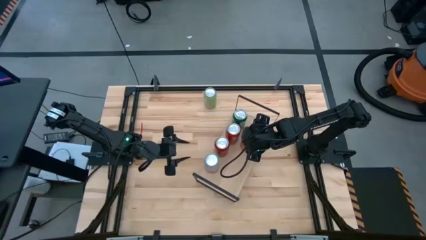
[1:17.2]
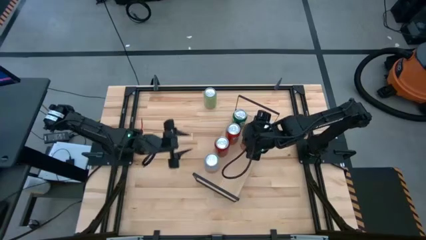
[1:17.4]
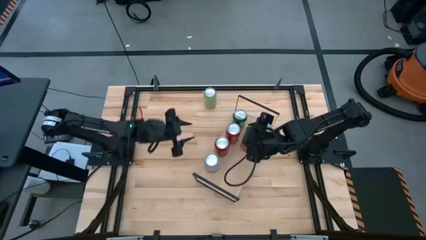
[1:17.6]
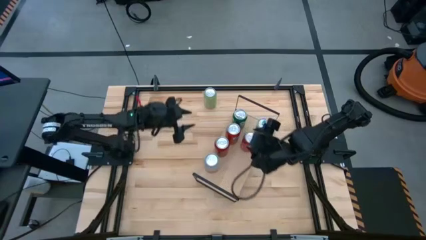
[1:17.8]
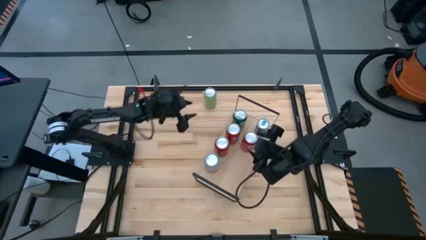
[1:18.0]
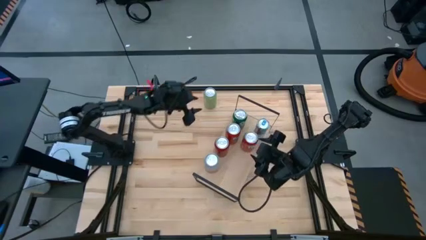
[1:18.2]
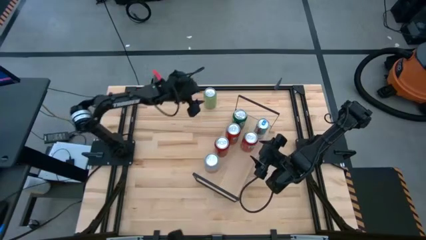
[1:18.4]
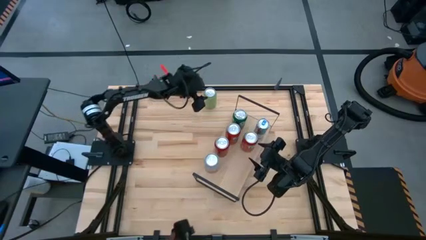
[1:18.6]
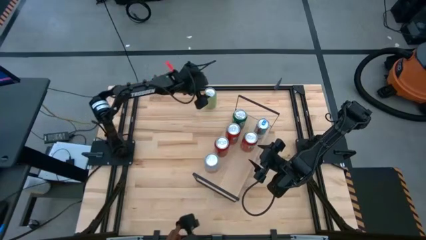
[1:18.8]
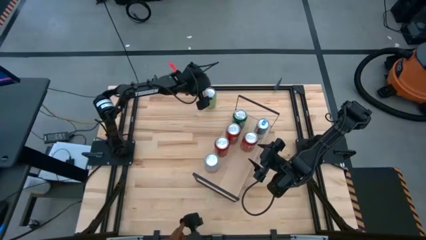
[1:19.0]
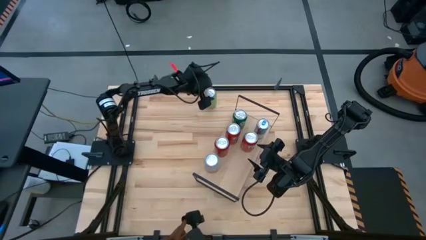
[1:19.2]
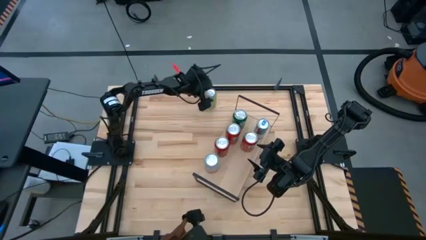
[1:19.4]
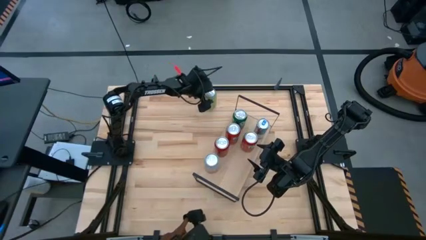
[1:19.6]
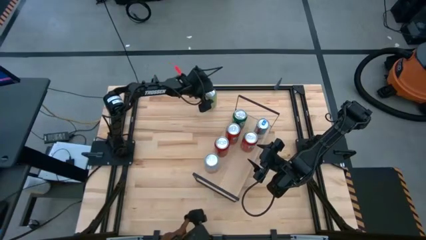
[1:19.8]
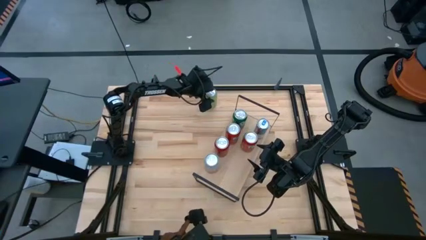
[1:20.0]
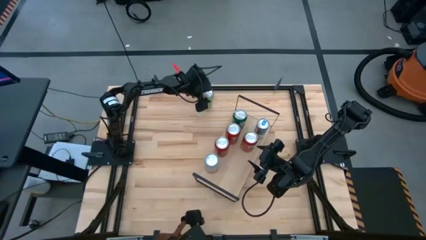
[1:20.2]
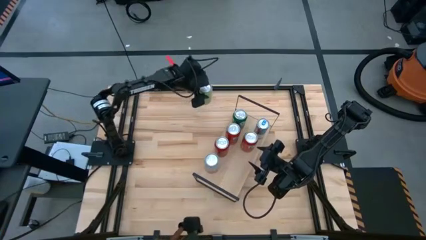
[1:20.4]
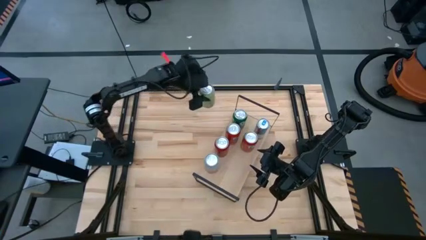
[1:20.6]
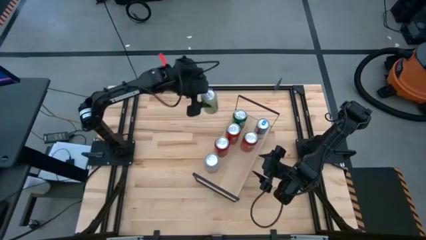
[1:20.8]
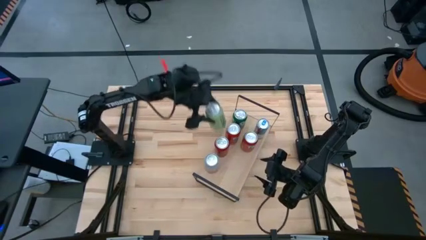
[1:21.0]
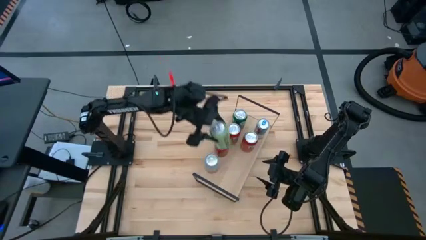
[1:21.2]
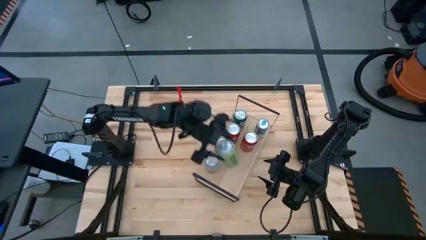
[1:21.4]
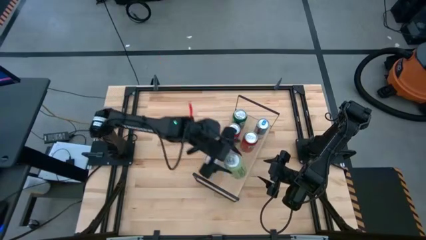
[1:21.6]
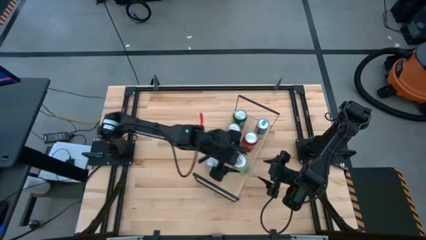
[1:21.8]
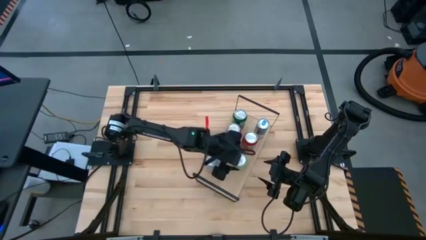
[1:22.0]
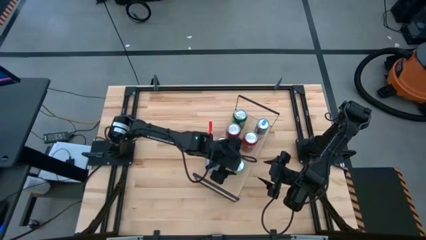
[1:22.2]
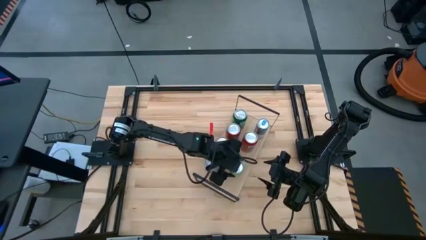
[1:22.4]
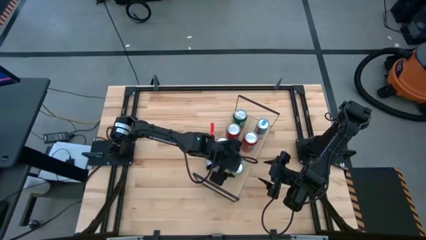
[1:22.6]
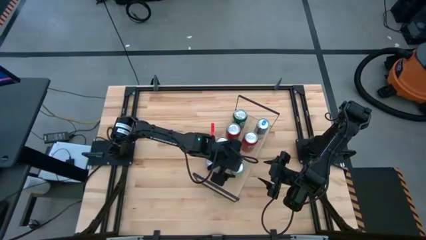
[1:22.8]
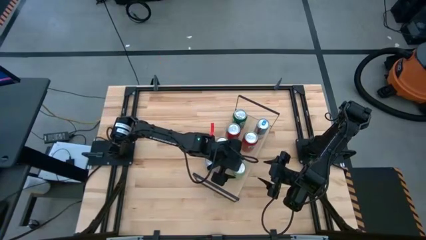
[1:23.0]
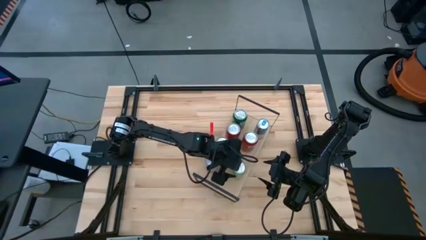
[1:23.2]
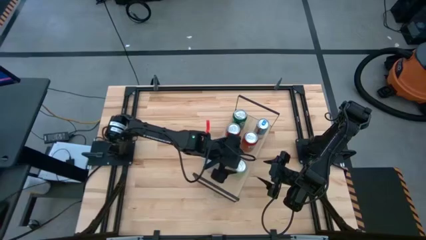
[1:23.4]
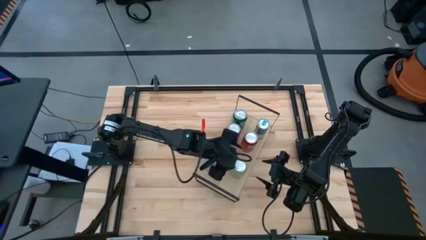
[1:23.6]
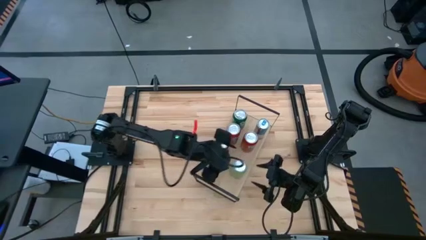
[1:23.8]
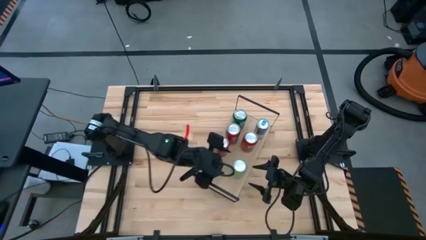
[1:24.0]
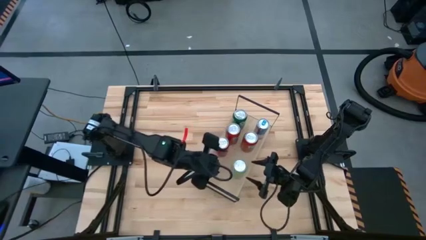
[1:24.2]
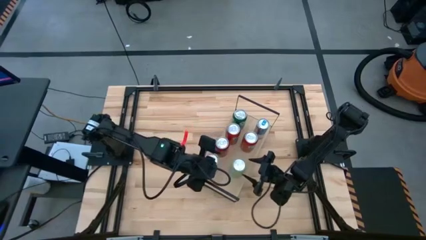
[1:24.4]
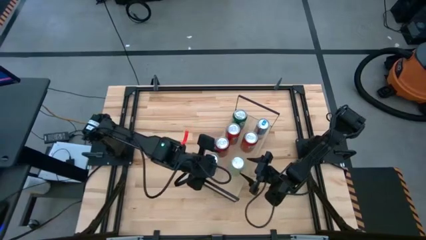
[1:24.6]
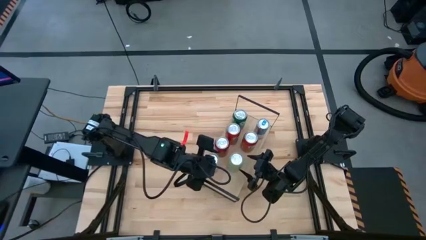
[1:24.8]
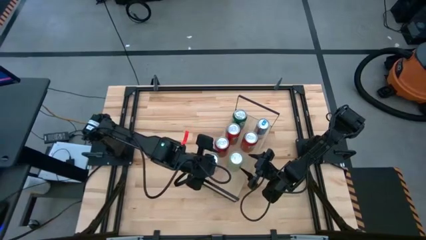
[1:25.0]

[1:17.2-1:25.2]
Task: Place canned beverage on shelf
Put the light green soda can on the shelf

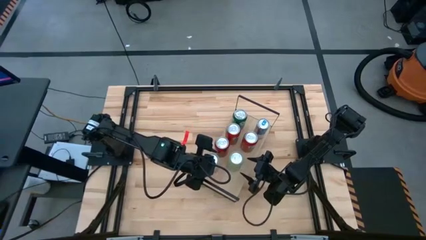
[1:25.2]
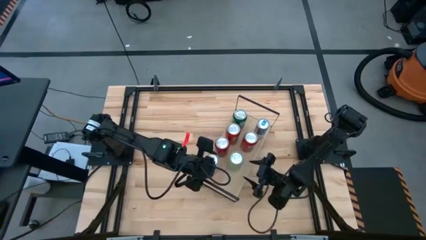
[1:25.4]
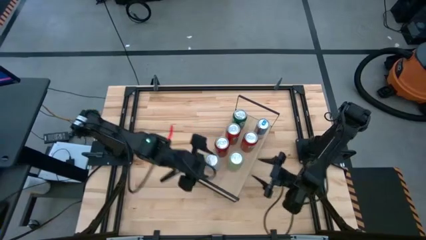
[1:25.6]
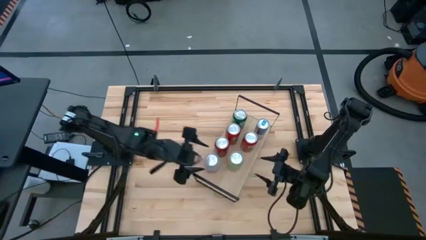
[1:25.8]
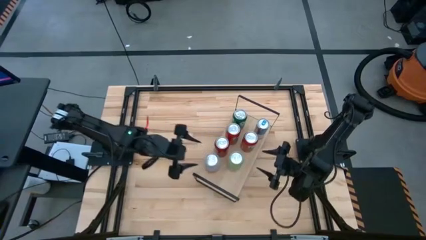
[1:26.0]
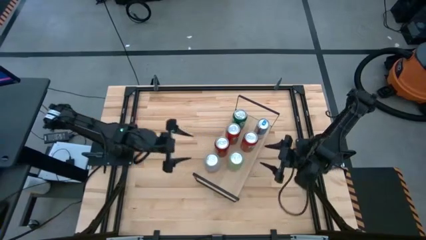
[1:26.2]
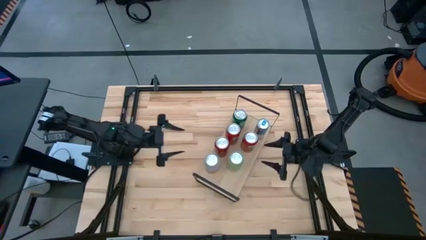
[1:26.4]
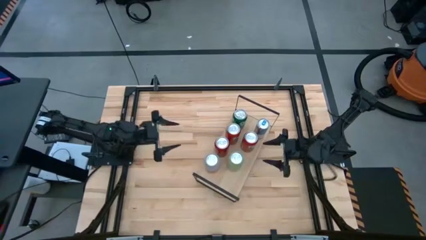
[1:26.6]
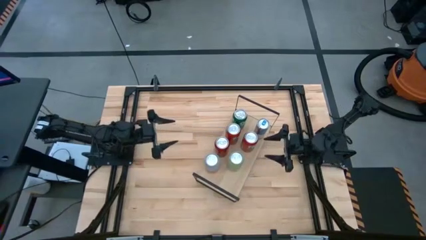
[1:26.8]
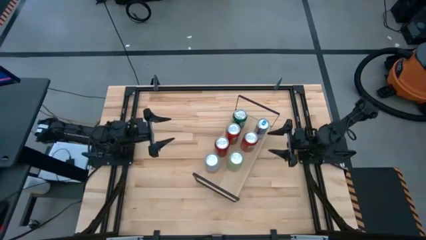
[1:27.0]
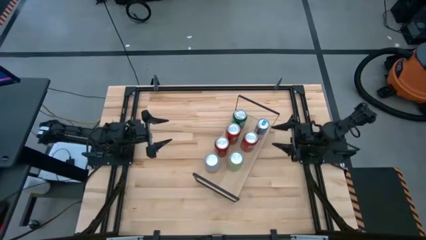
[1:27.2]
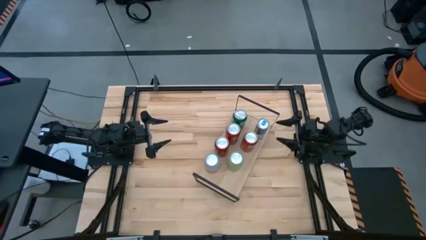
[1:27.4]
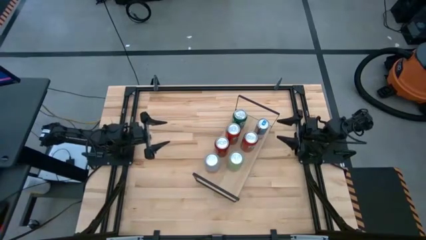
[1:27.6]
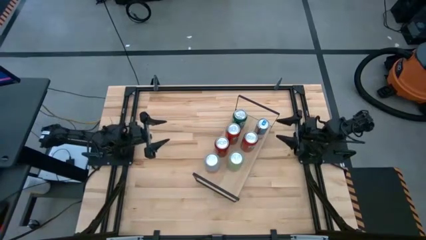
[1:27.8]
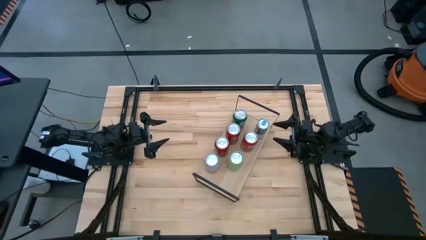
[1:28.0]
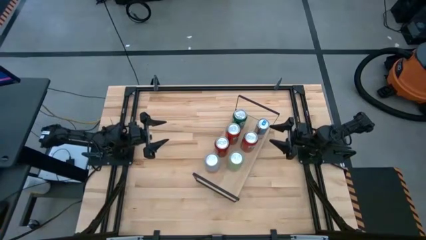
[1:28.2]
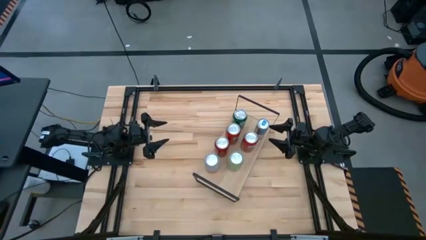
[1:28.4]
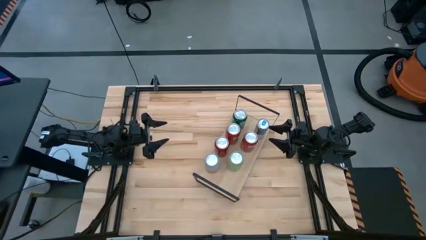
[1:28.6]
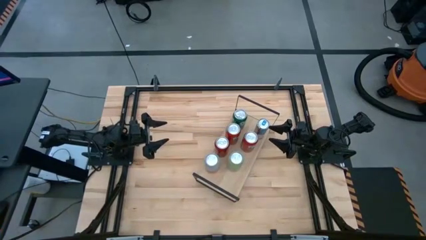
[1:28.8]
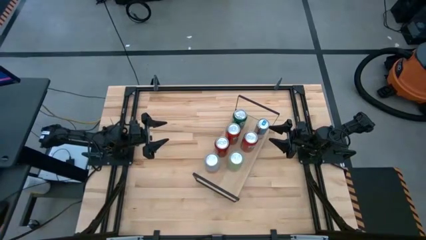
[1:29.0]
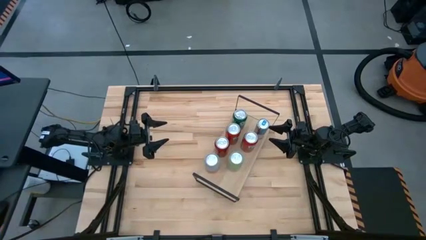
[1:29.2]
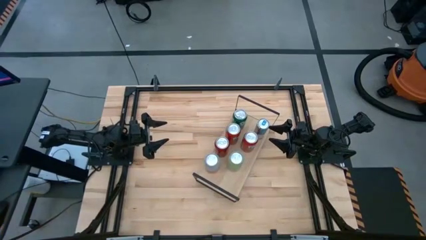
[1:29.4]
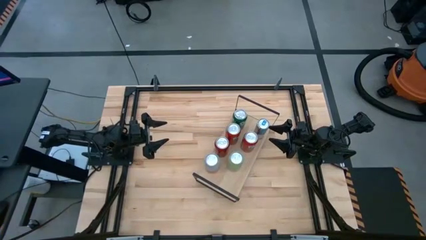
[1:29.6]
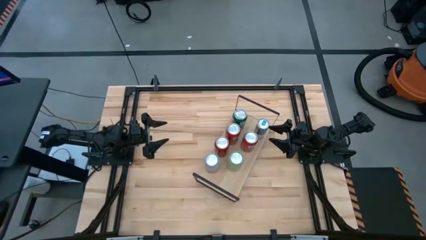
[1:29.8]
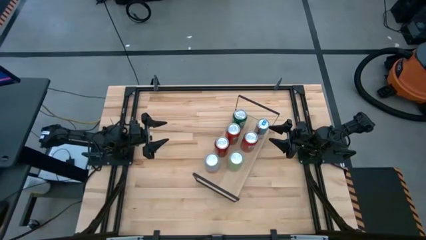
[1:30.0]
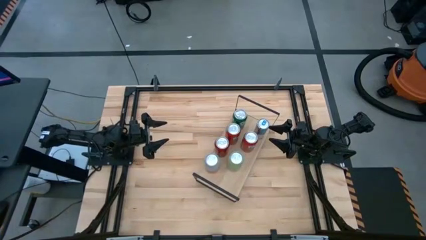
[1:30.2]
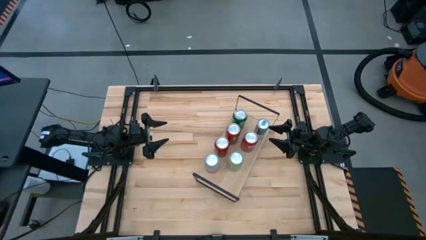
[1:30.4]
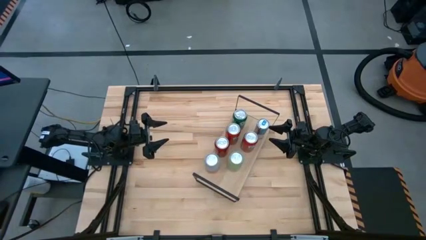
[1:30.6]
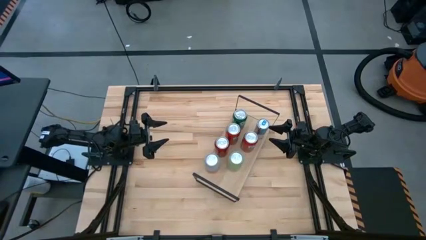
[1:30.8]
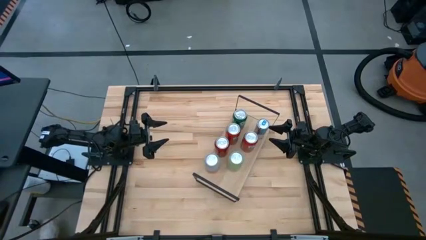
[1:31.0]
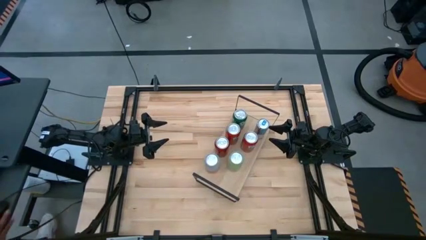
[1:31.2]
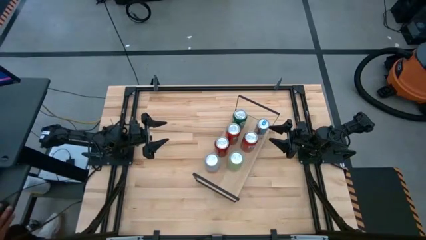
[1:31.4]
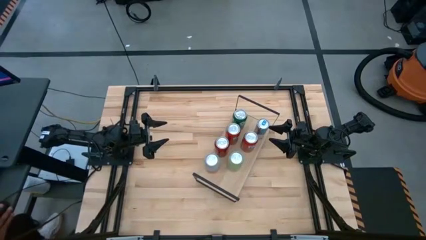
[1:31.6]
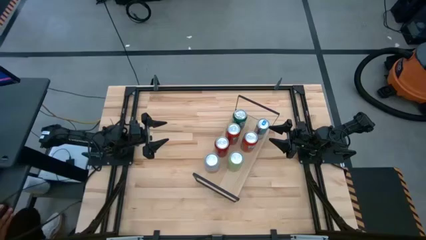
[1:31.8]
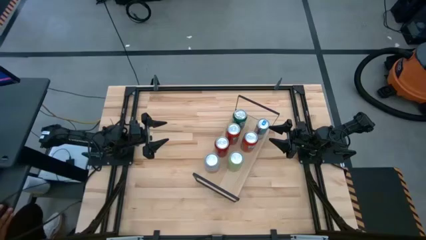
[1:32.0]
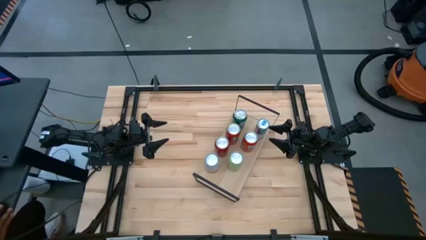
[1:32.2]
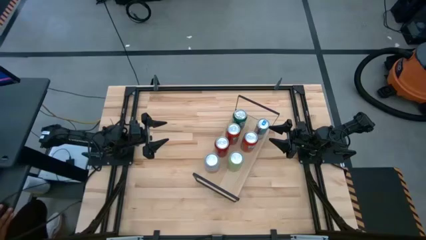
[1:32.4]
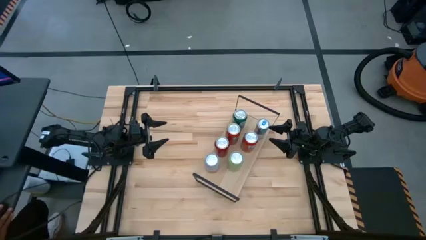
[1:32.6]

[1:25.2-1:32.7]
Return to Home Position
